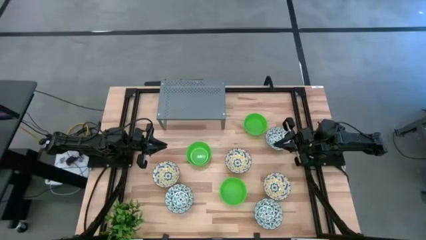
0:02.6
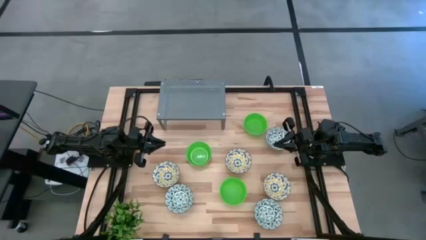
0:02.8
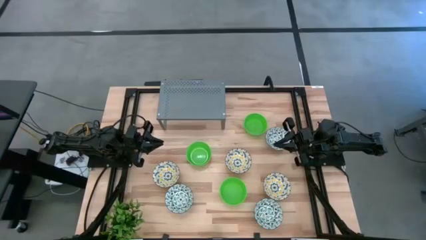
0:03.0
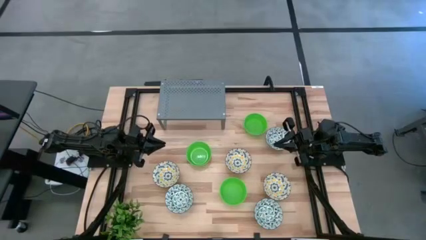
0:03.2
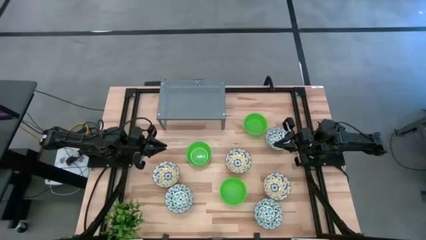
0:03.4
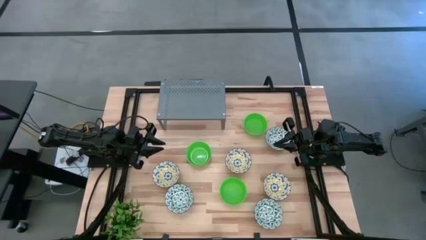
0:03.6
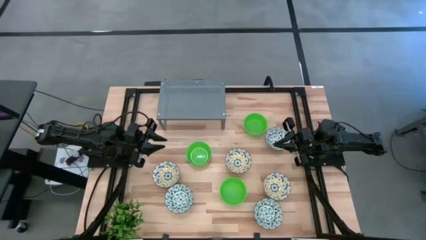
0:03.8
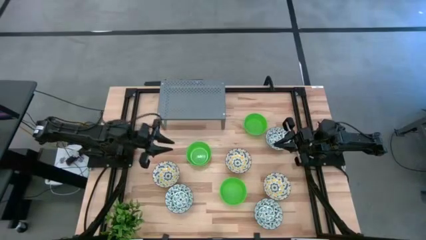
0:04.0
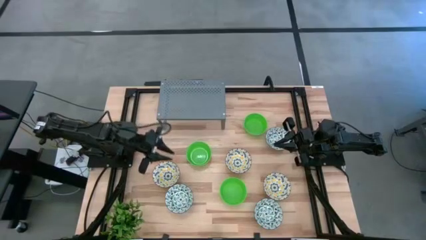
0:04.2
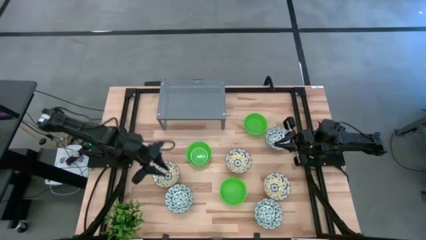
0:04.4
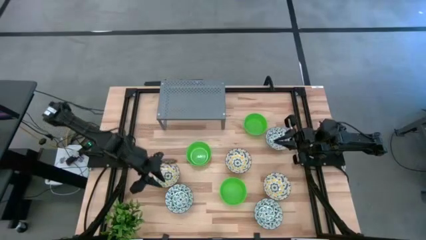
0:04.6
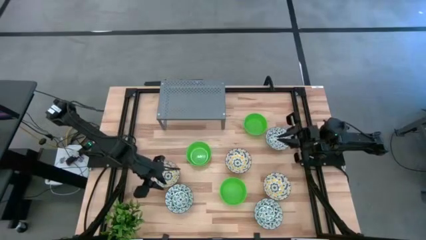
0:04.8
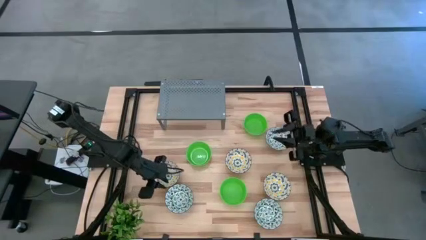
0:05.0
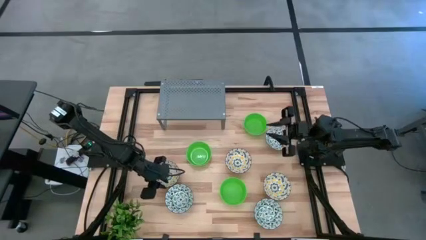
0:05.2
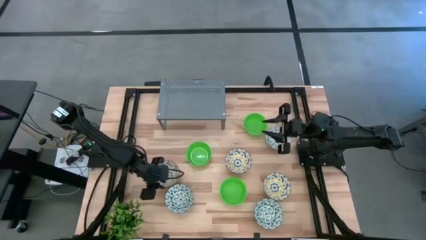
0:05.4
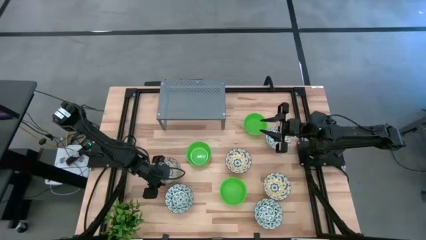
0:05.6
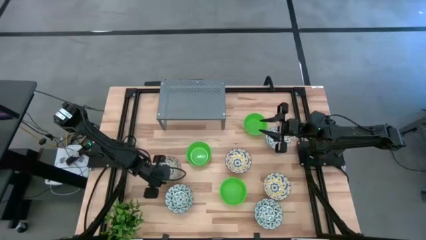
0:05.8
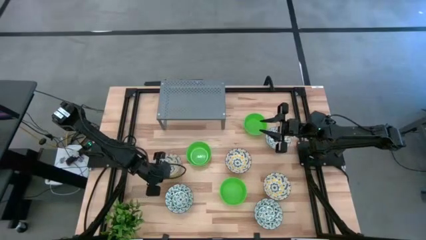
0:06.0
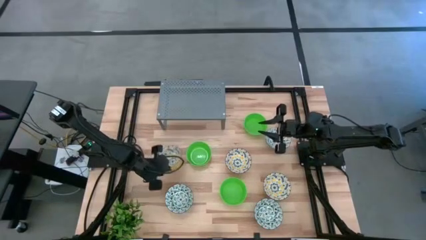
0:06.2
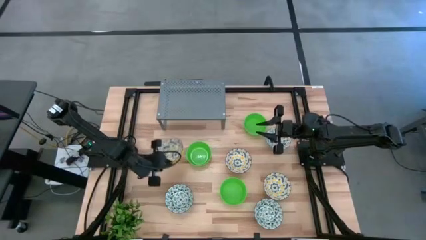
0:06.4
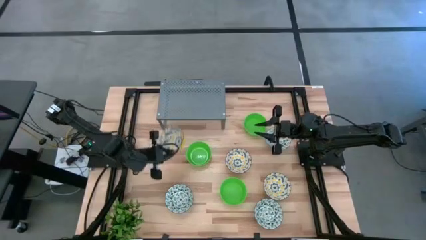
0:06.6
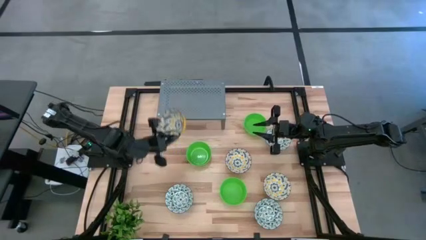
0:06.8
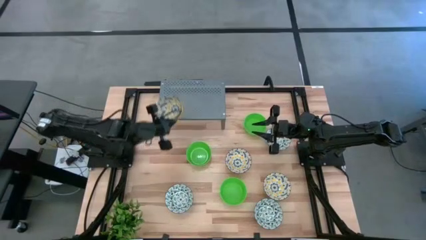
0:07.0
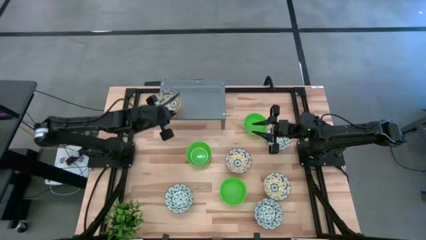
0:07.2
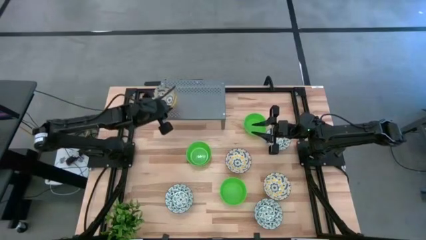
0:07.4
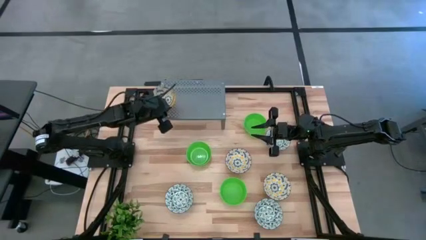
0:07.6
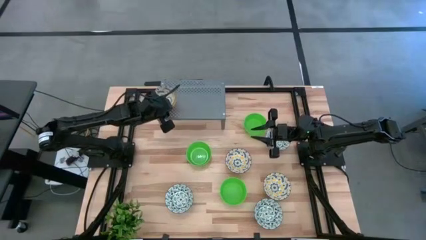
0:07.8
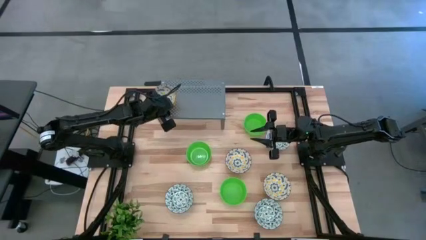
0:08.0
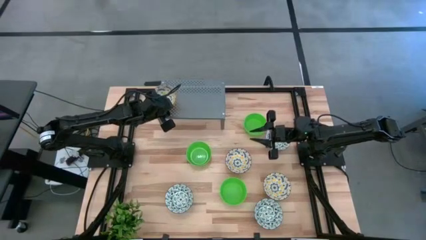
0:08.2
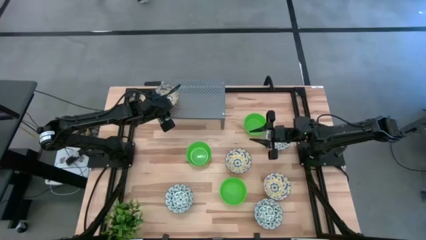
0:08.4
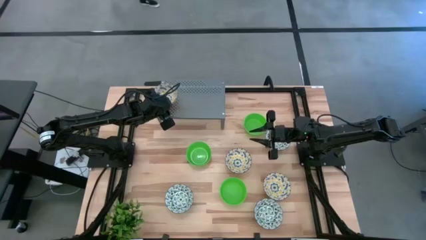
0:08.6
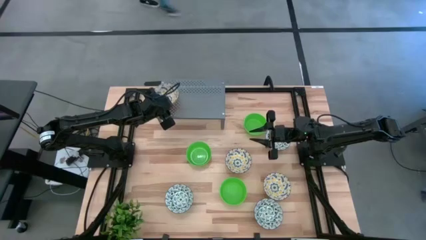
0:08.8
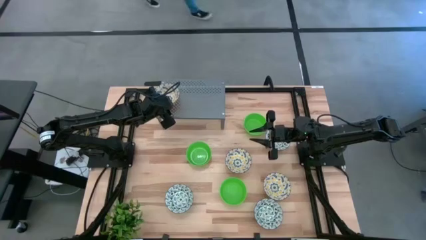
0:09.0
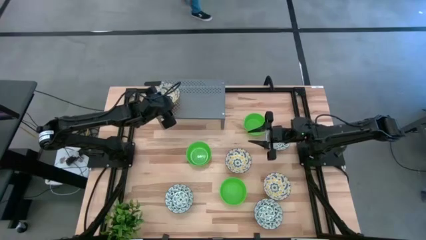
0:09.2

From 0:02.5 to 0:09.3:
Task: Pick & Place Mini bowls
Put the left yellow patterned bowl on the shelf

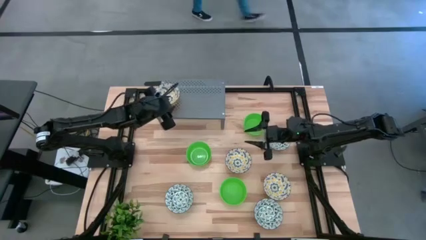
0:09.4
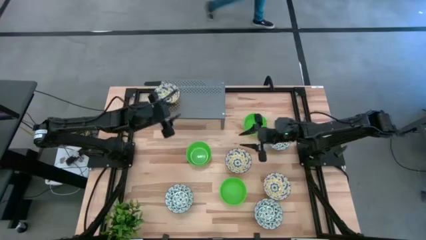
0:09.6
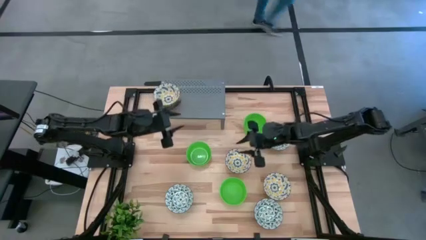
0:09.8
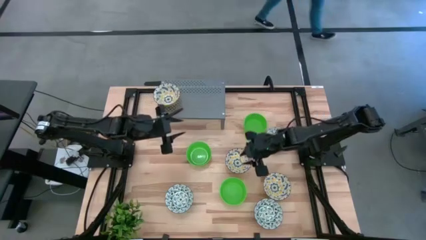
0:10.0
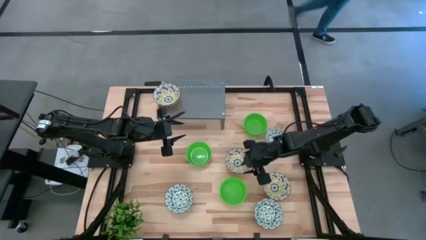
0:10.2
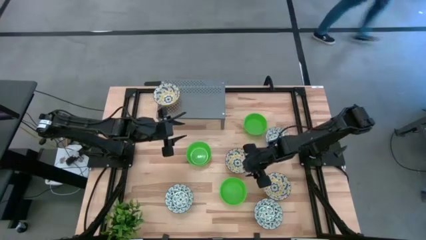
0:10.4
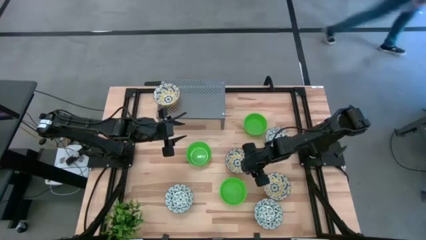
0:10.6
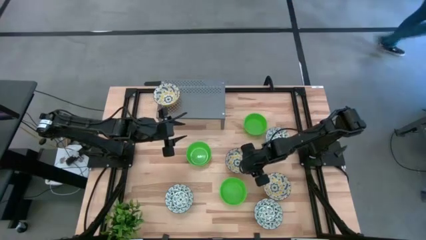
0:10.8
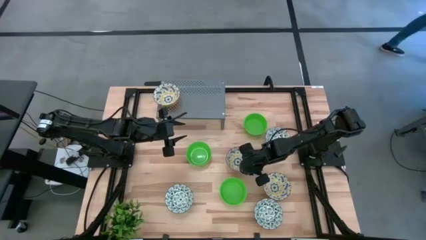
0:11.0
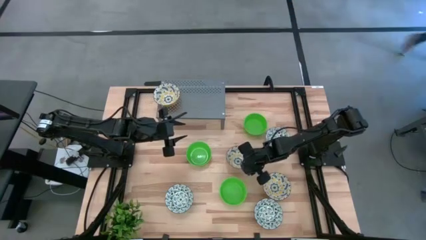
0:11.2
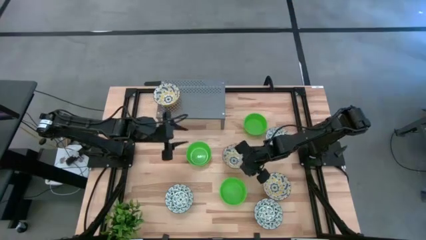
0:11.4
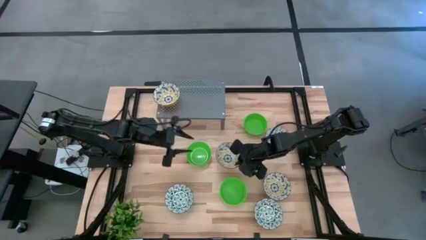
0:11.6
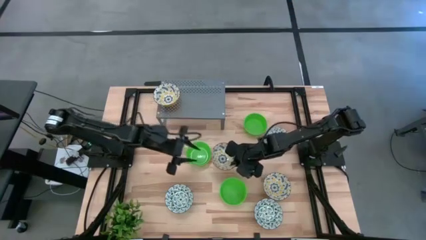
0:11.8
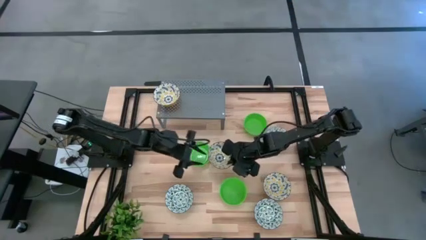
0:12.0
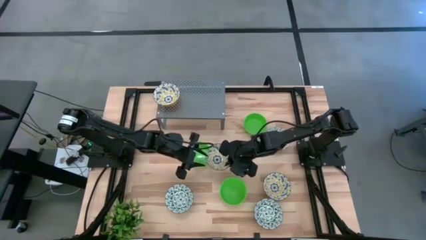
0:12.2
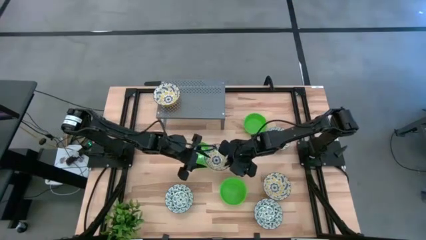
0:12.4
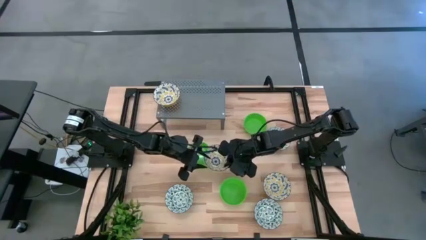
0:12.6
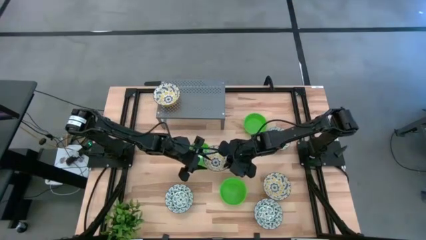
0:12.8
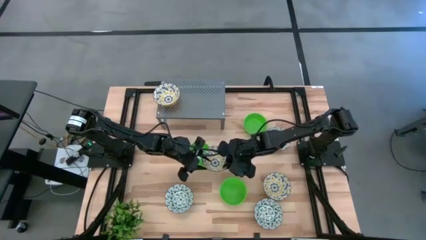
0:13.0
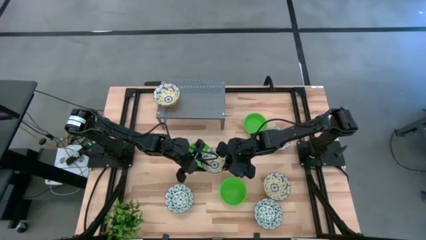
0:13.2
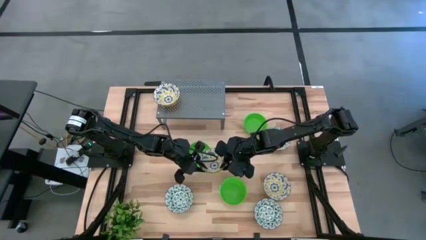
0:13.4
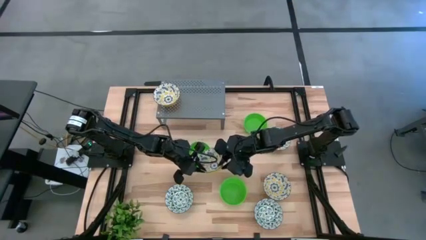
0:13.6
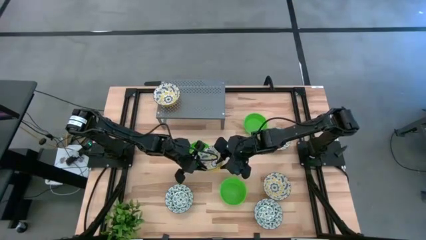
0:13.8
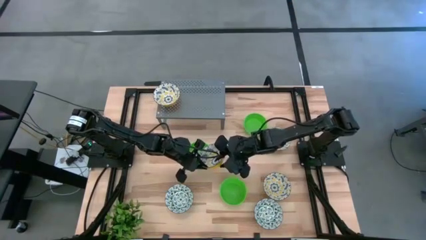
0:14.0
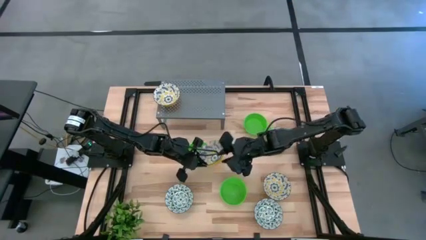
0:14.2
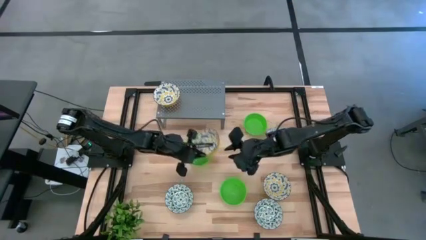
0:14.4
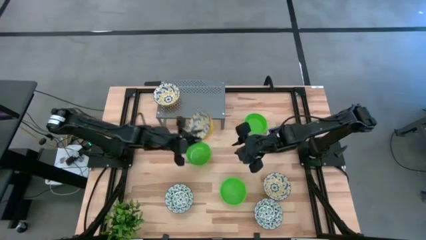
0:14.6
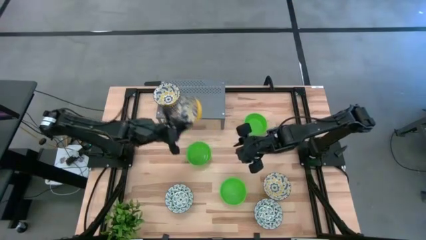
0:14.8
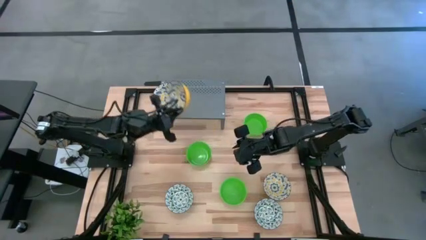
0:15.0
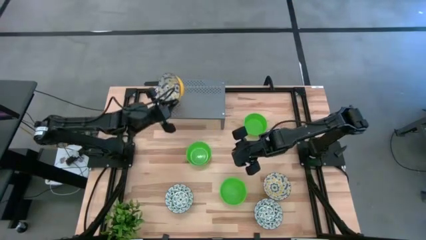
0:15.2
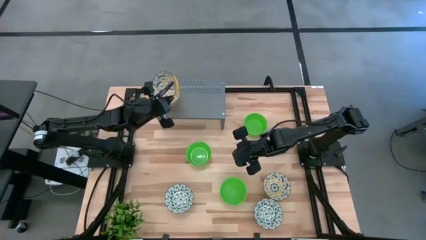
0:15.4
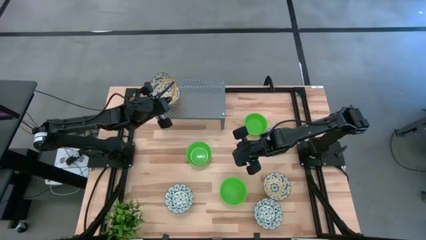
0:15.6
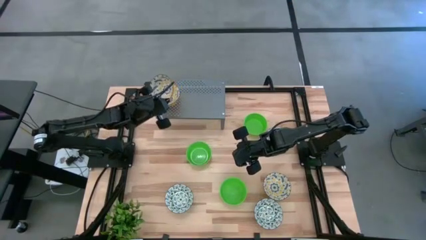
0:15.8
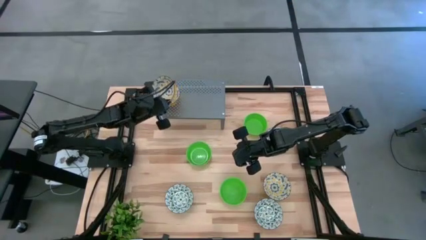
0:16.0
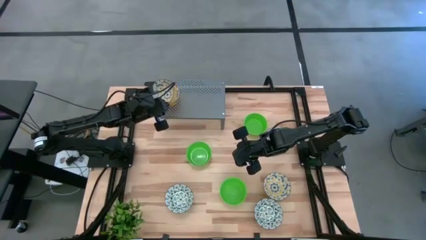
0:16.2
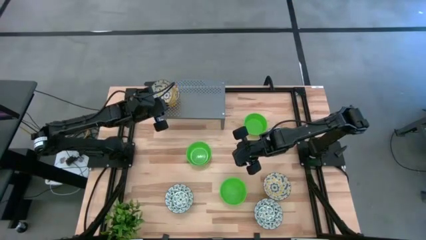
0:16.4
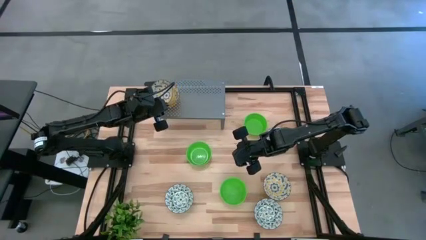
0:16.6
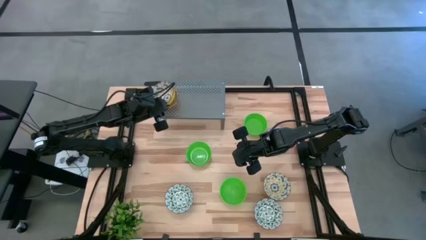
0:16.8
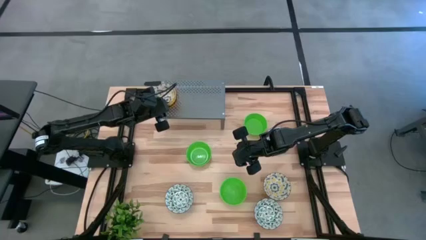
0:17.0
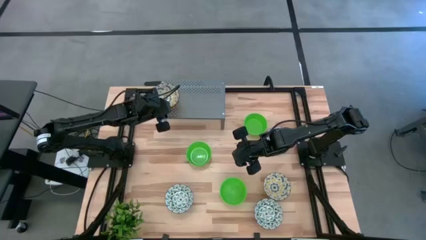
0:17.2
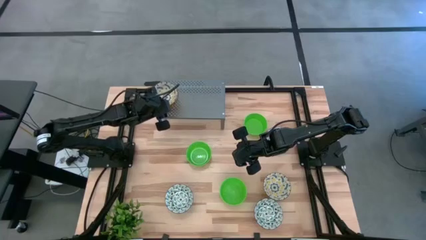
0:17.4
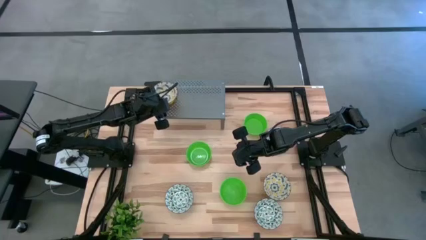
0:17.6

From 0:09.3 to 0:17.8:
Stack the left yellow patterned bowl on the yellow patterned bowl on the shelf
